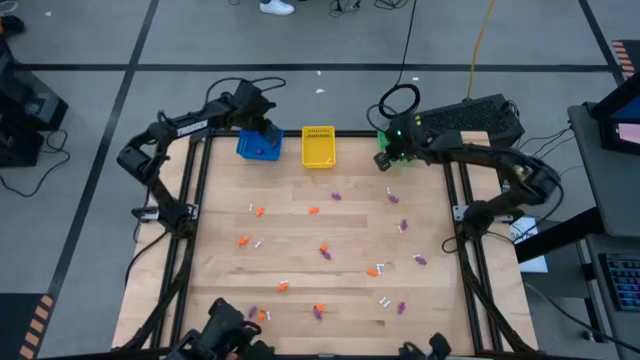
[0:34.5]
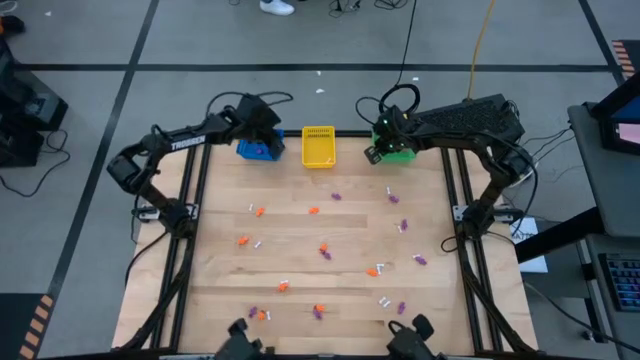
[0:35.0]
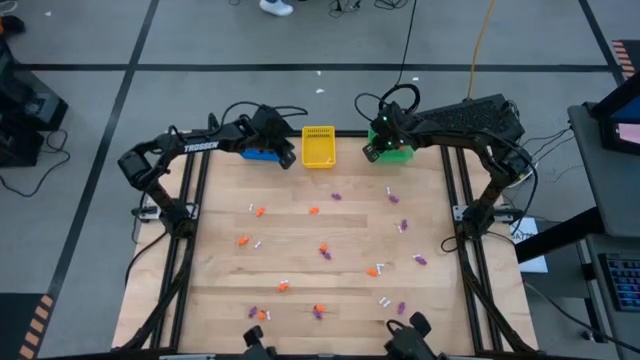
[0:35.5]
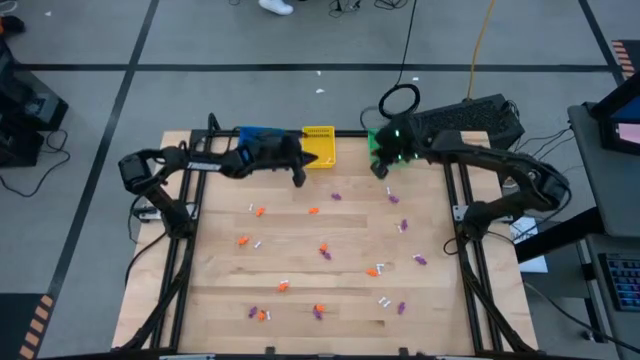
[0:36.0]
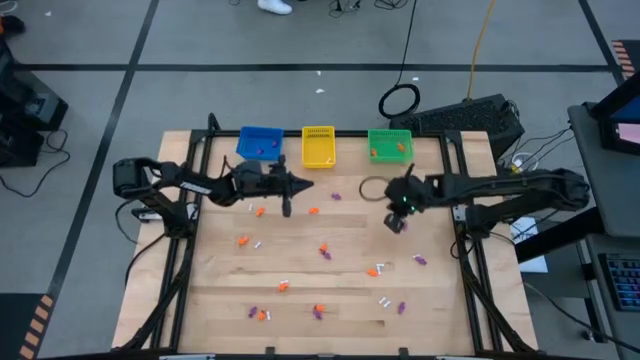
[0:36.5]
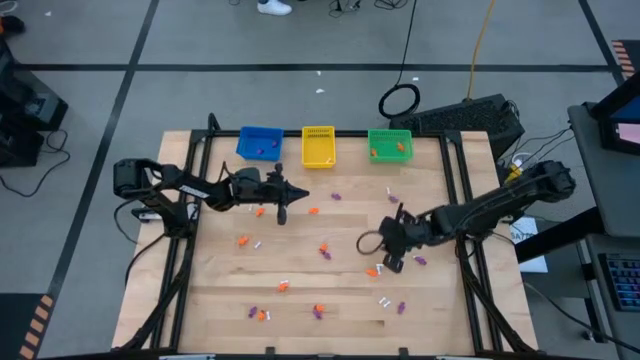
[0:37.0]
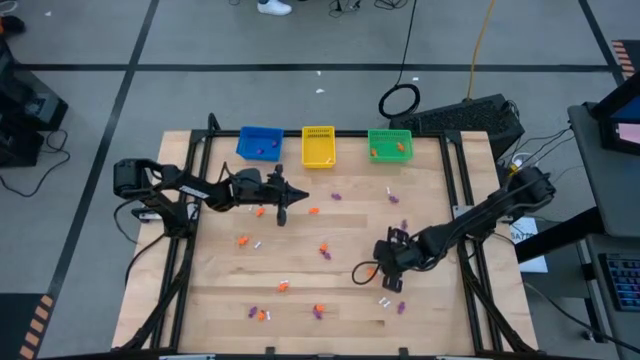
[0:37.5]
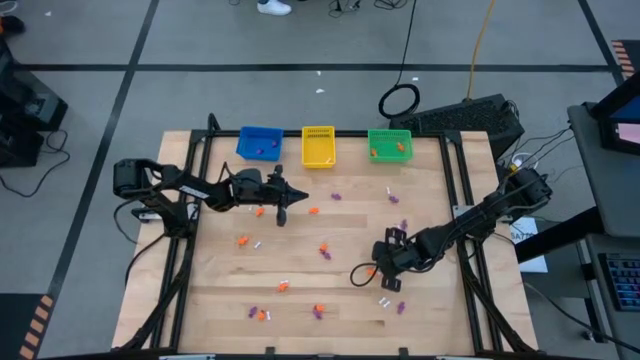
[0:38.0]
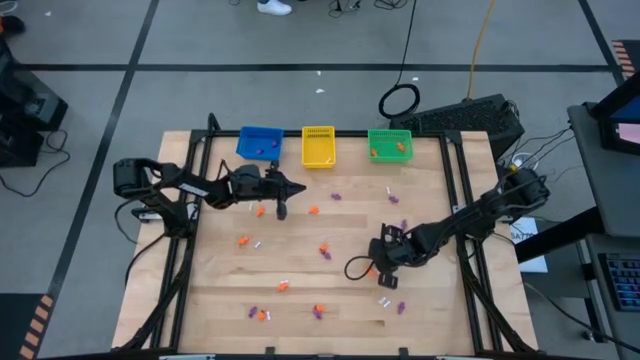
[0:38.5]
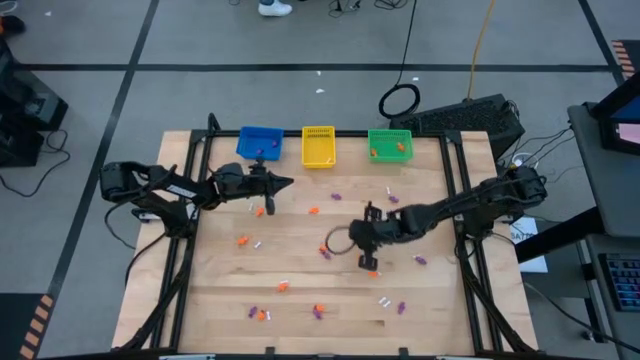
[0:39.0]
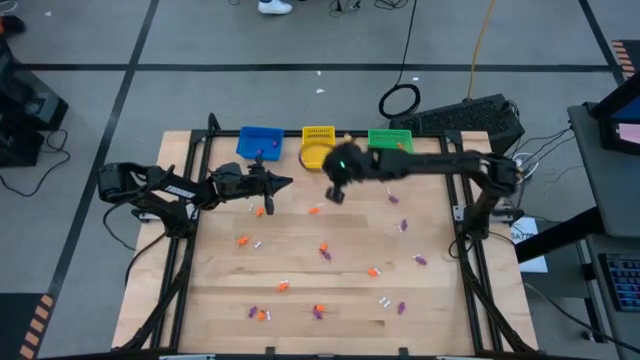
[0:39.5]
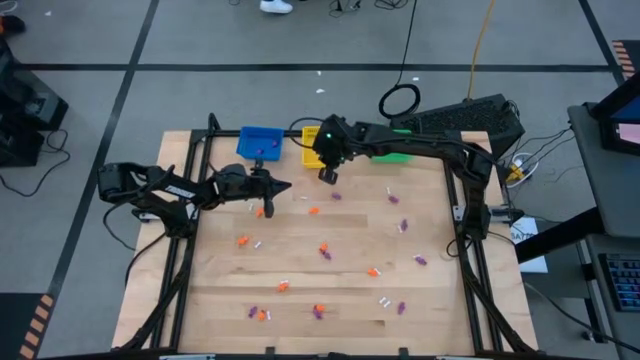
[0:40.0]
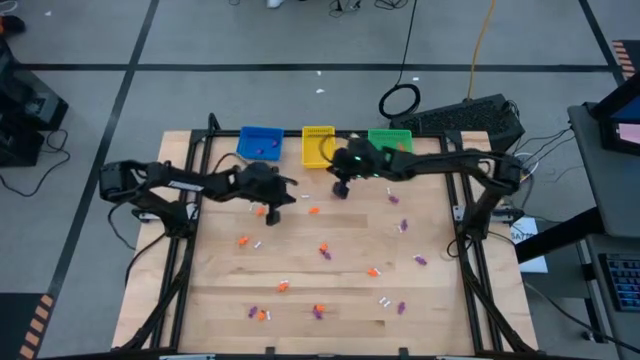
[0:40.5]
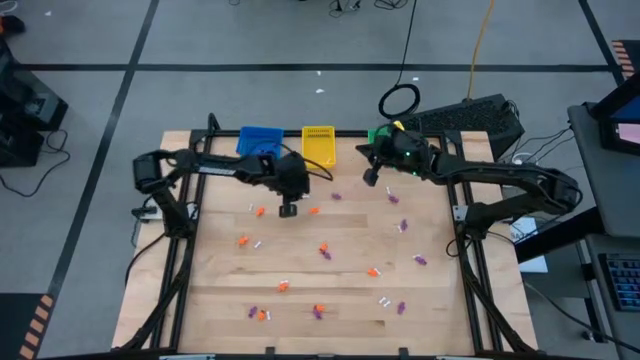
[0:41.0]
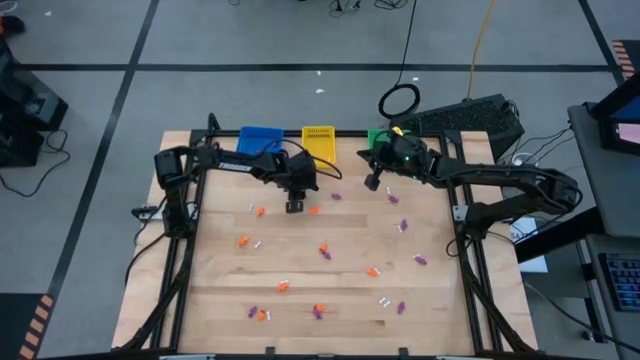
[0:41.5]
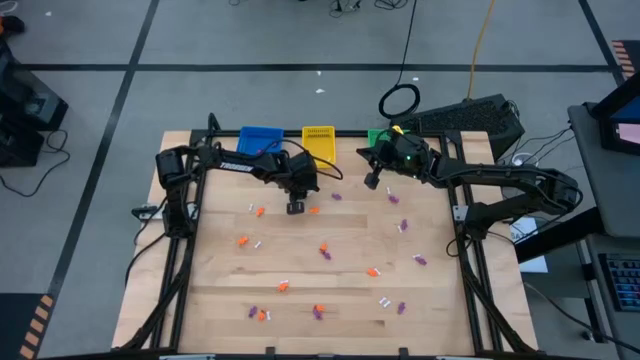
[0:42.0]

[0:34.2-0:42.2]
Task: Sort Halloween decoration
Put the white bone toy into the yellow bin

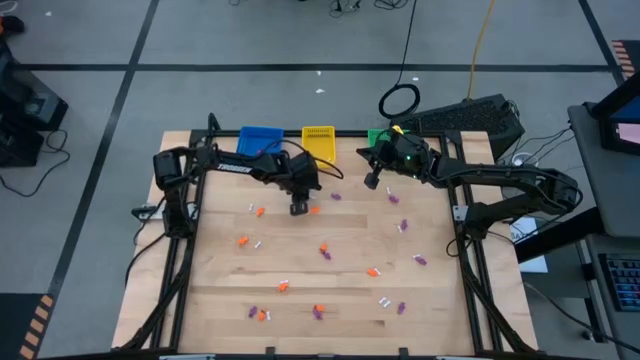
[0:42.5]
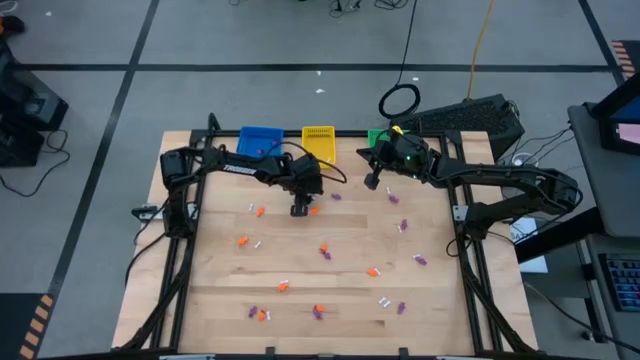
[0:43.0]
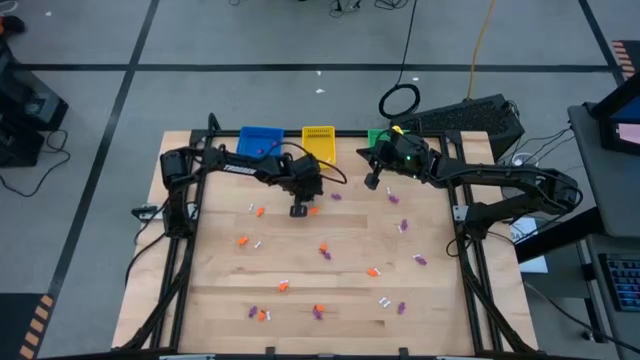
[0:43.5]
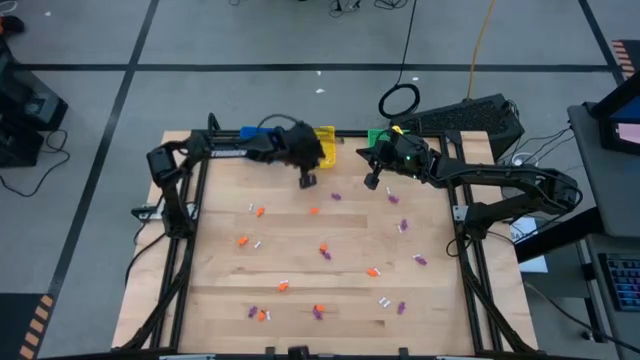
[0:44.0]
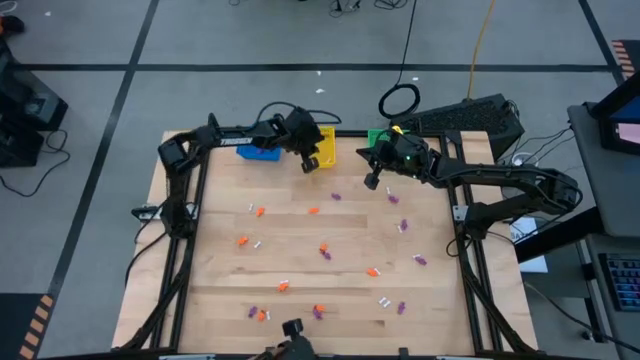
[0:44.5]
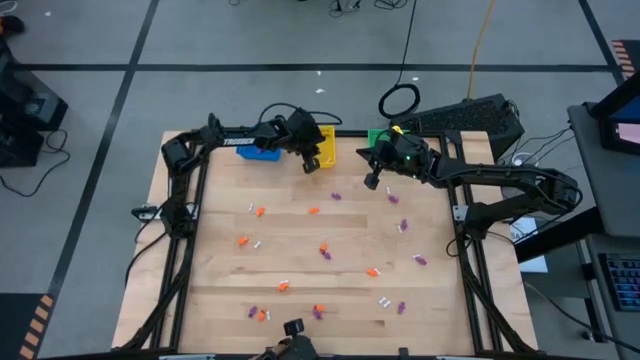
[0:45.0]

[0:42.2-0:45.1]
Put the white bone toy into the yellow bin

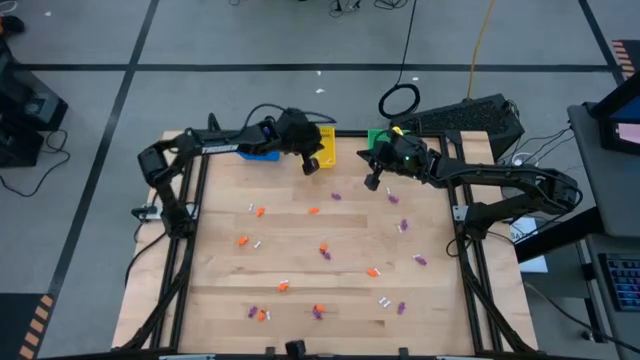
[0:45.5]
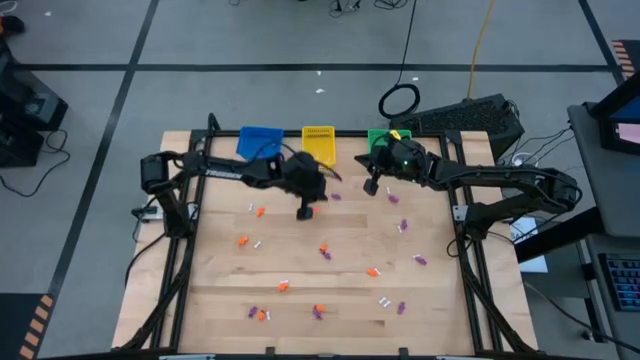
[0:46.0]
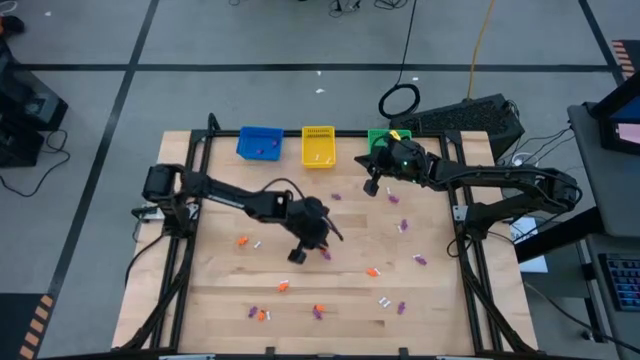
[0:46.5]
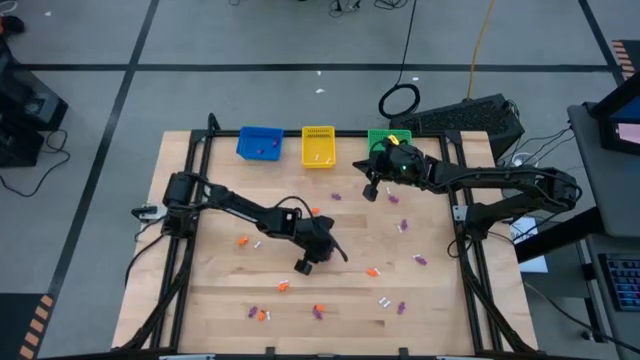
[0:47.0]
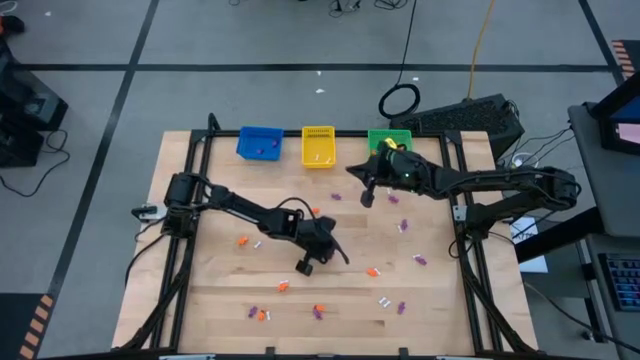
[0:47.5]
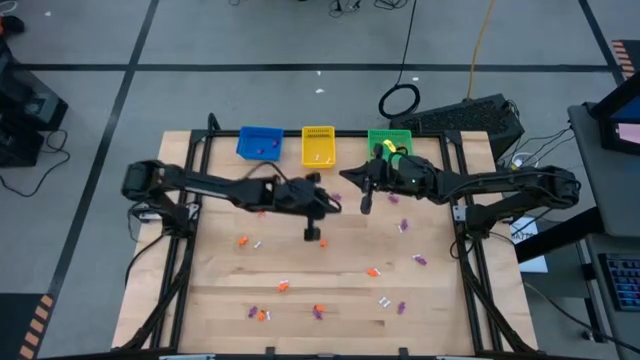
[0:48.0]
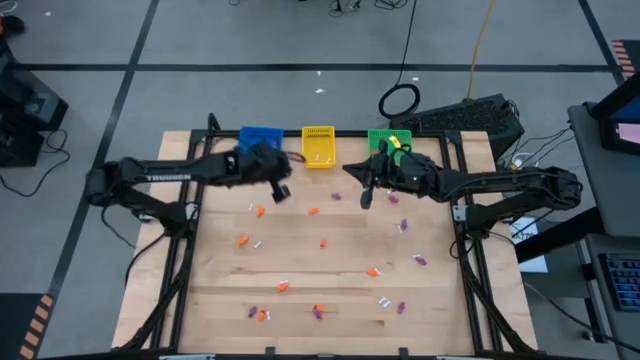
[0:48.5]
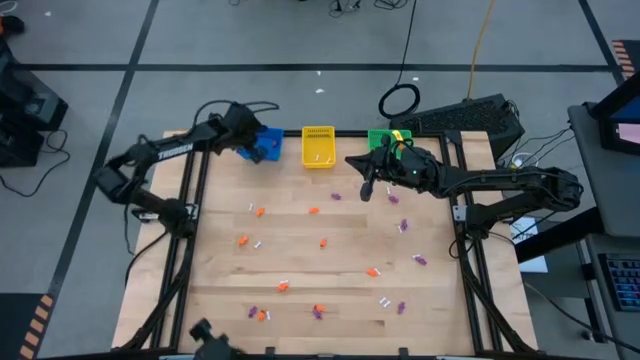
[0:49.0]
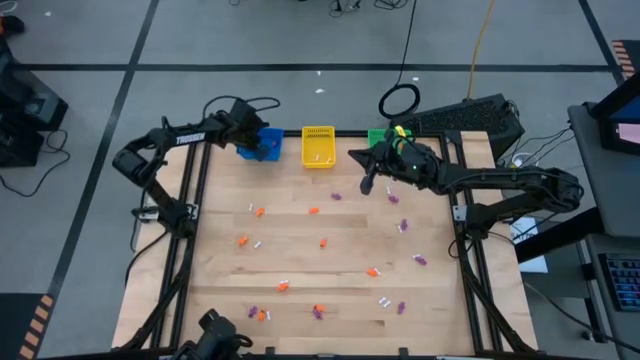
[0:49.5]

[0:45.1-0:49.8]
Put the violet skeleton toy into the blue bin

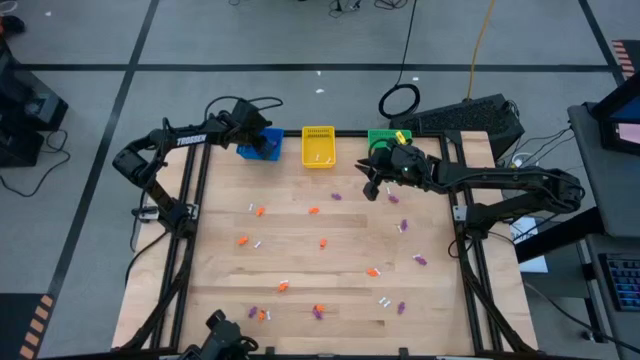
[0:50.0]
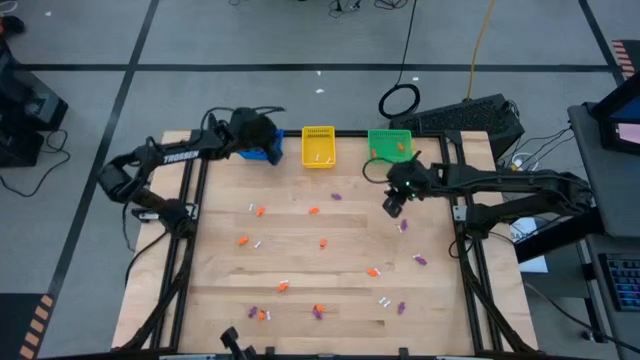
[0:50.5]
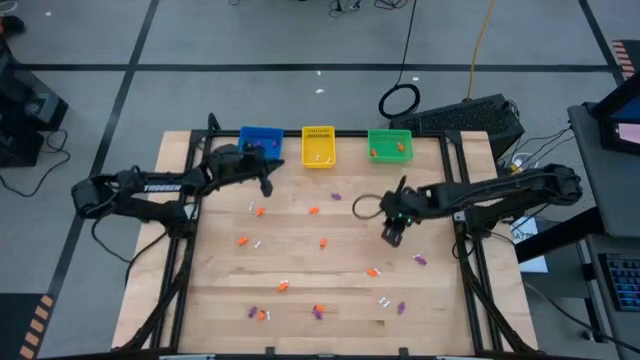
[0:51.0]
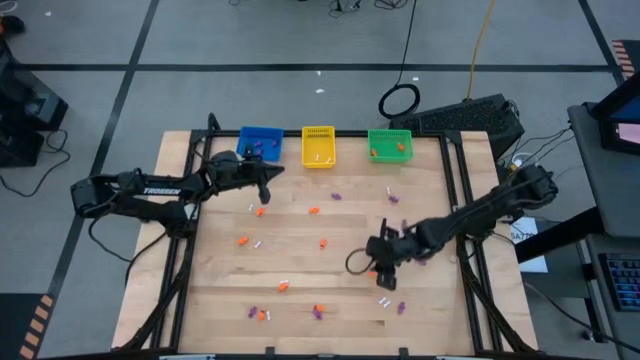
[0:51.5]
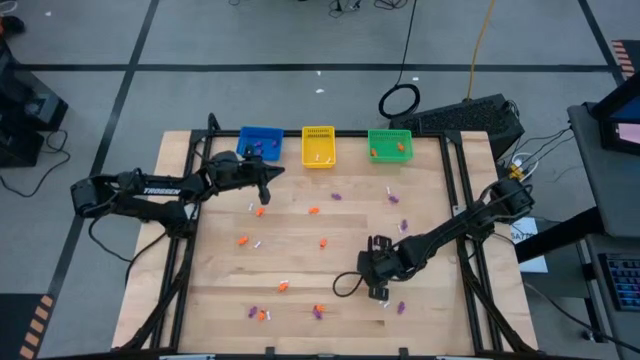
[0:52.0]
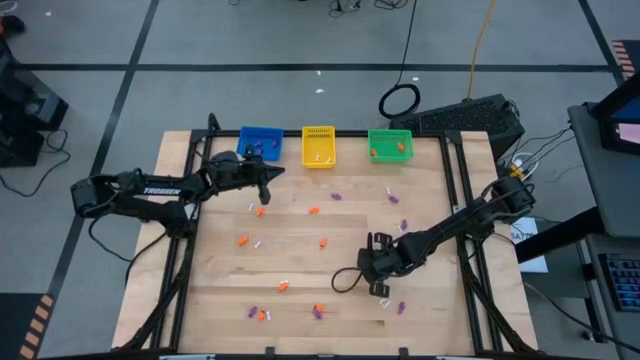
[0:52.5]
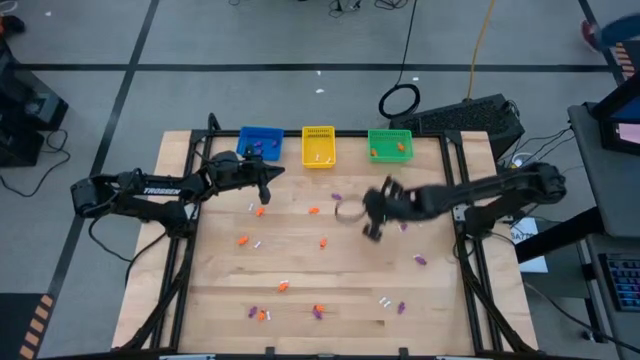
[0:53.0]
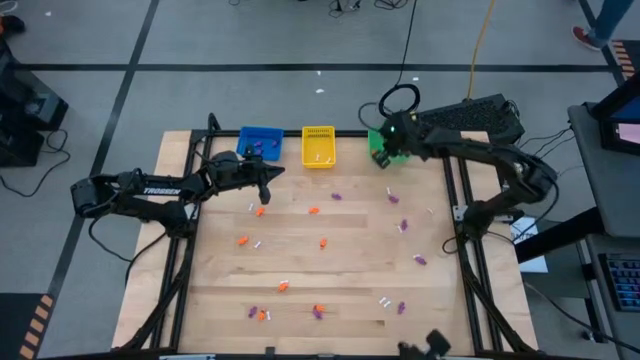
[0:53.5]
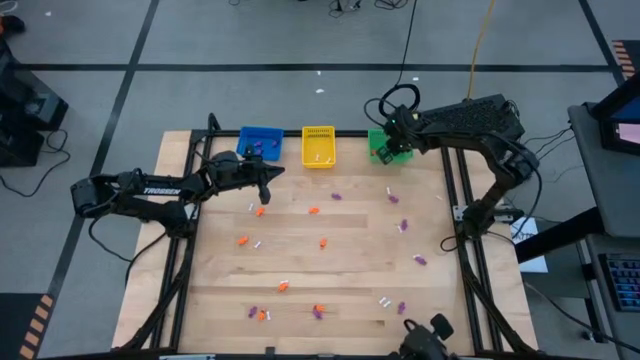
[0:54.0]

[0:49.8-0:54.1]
Put the orange skeleton toy into the green bin
